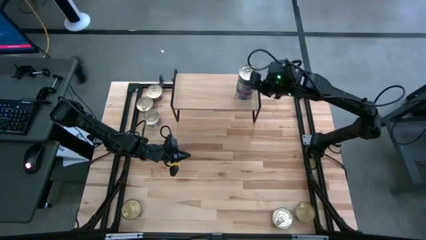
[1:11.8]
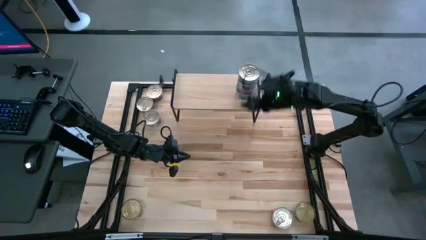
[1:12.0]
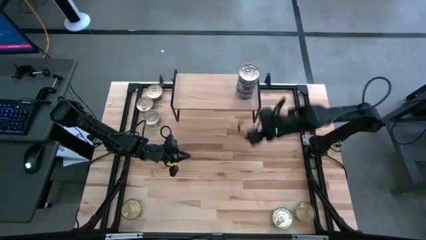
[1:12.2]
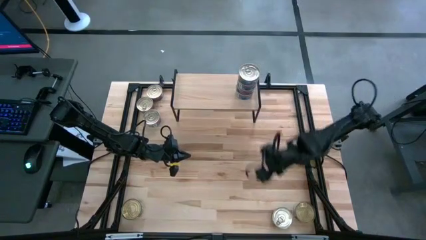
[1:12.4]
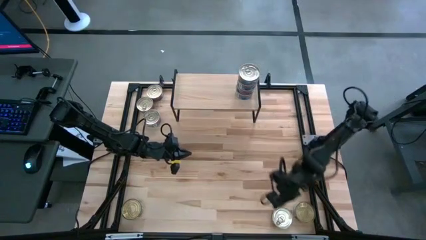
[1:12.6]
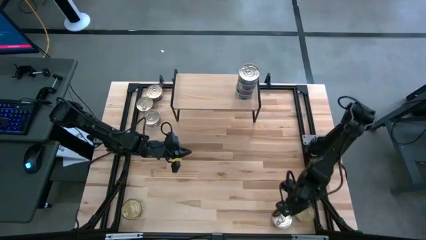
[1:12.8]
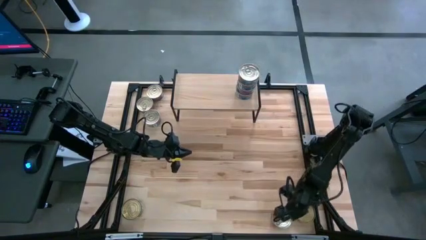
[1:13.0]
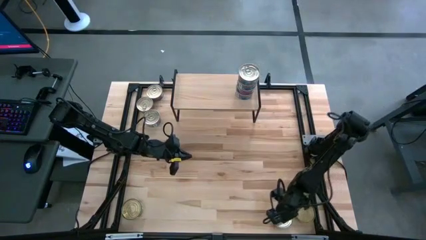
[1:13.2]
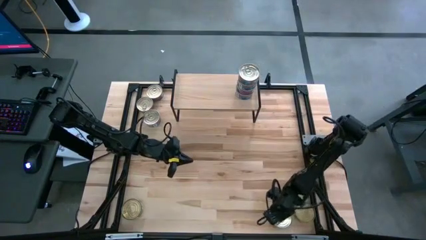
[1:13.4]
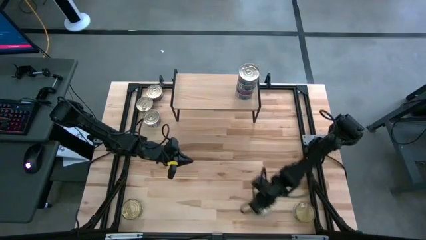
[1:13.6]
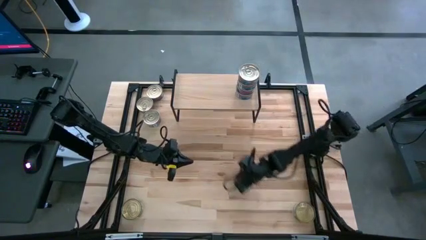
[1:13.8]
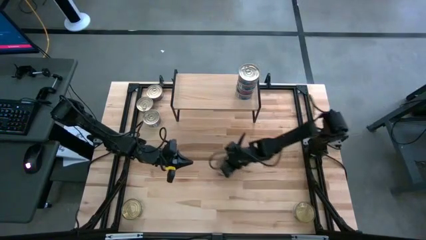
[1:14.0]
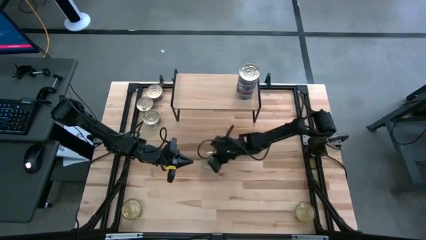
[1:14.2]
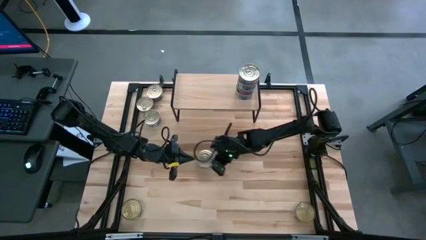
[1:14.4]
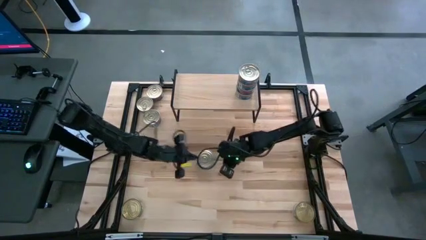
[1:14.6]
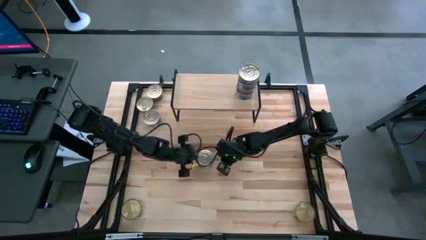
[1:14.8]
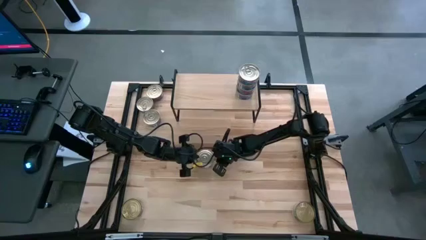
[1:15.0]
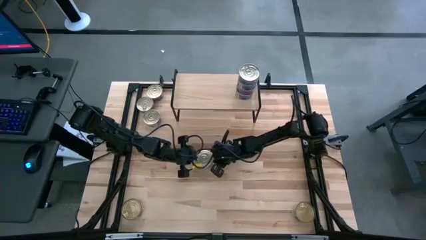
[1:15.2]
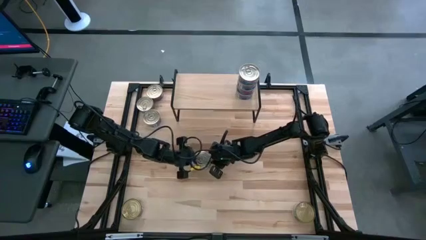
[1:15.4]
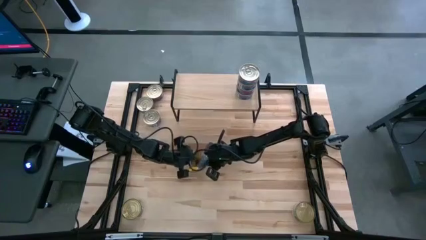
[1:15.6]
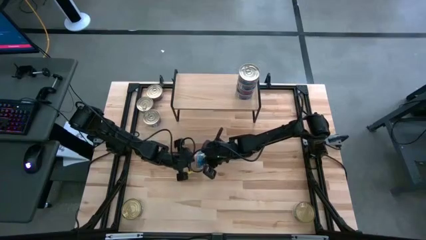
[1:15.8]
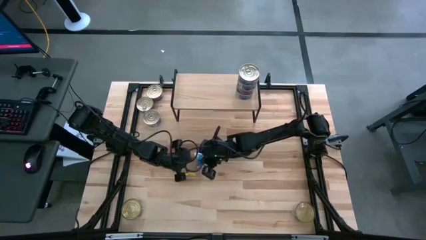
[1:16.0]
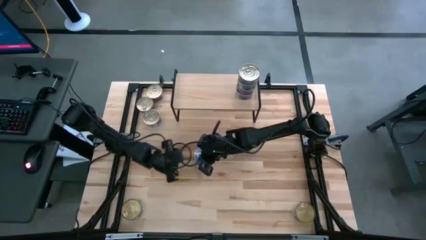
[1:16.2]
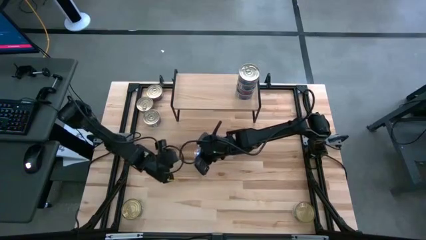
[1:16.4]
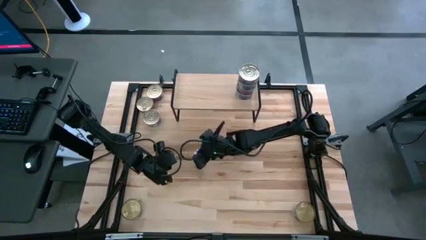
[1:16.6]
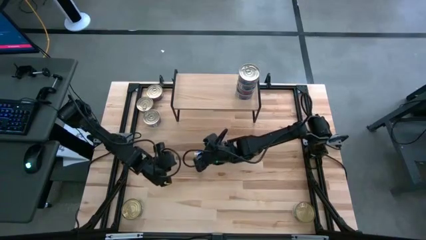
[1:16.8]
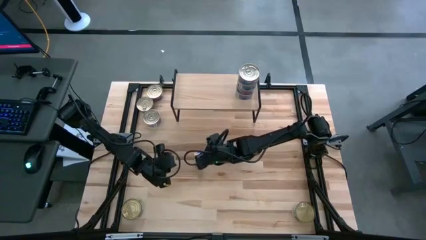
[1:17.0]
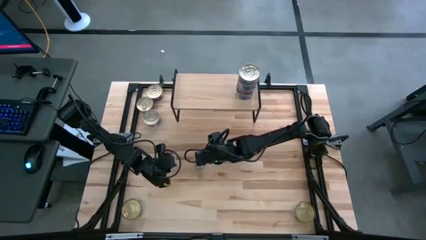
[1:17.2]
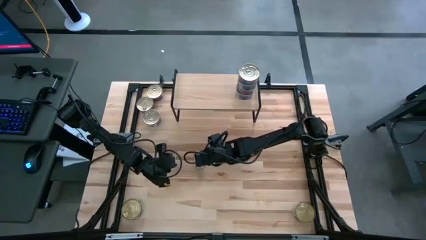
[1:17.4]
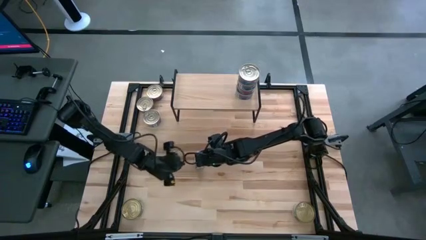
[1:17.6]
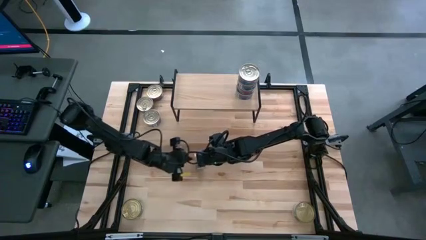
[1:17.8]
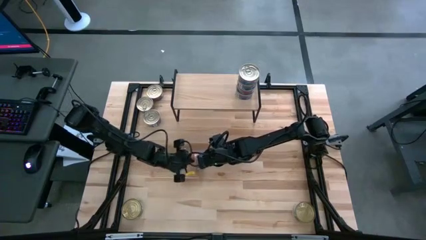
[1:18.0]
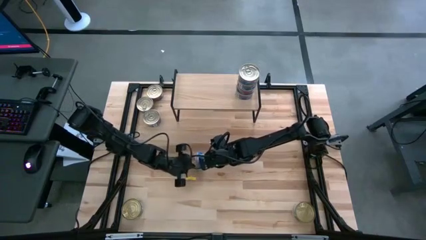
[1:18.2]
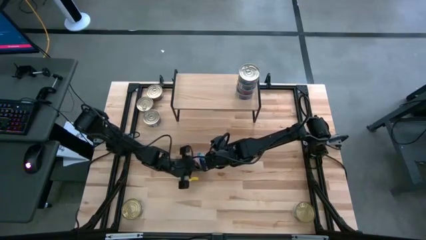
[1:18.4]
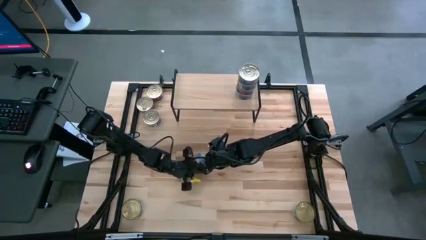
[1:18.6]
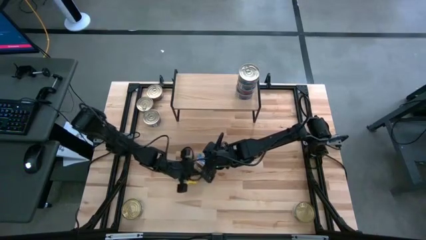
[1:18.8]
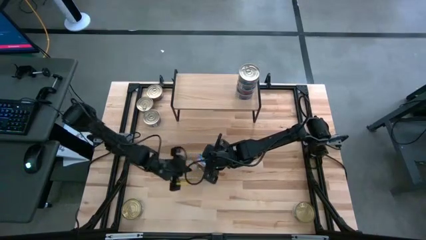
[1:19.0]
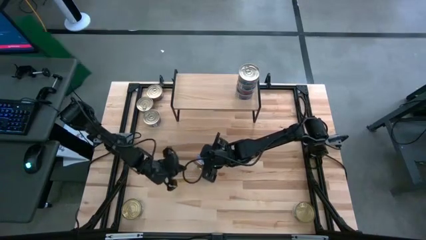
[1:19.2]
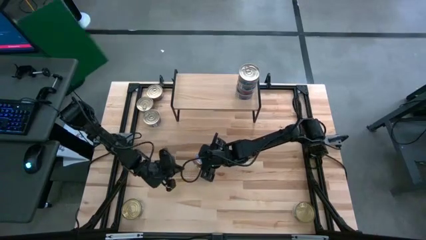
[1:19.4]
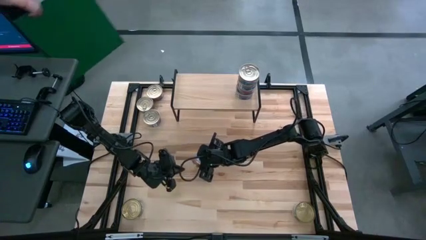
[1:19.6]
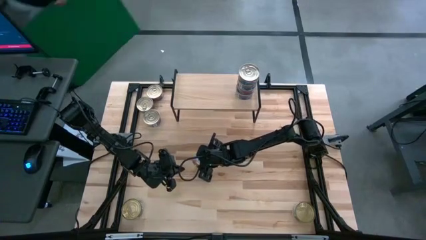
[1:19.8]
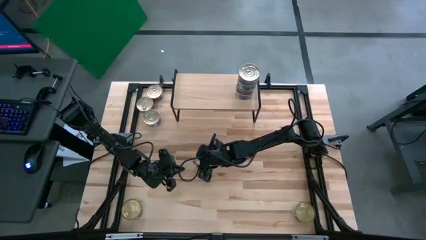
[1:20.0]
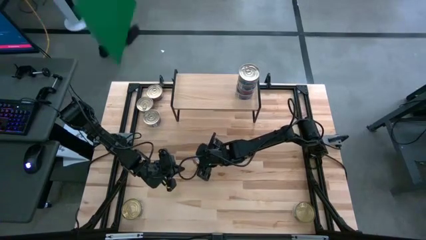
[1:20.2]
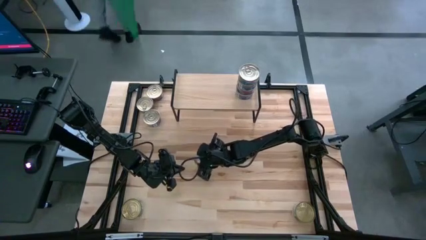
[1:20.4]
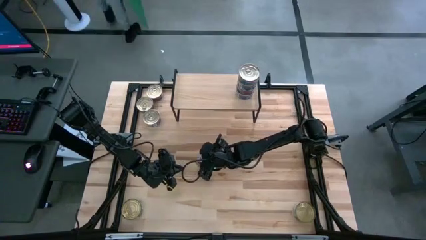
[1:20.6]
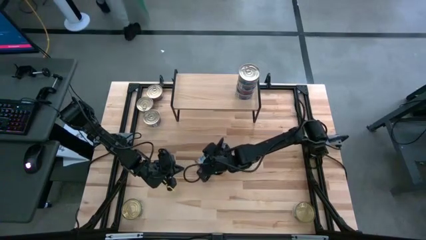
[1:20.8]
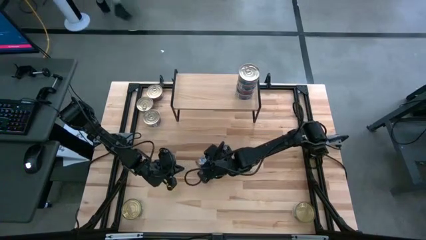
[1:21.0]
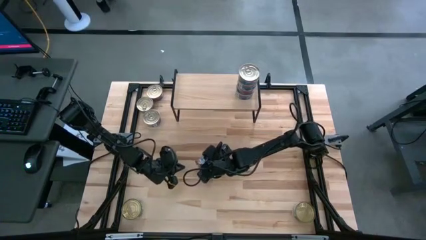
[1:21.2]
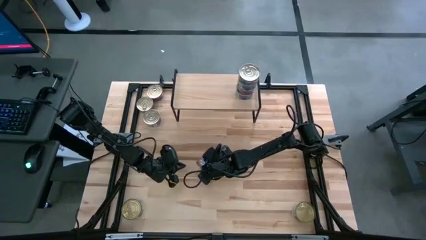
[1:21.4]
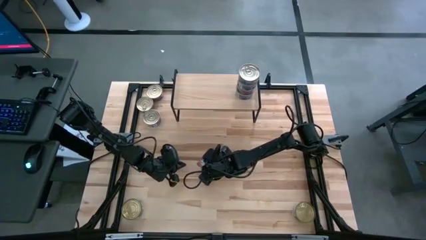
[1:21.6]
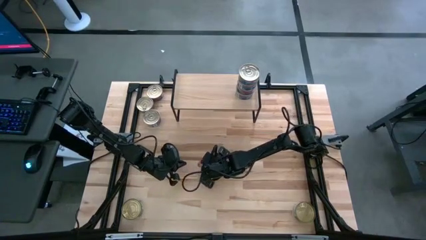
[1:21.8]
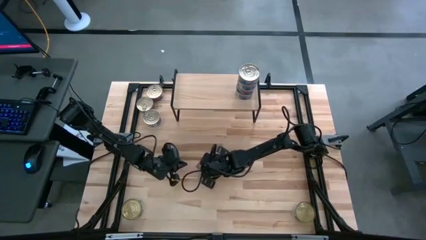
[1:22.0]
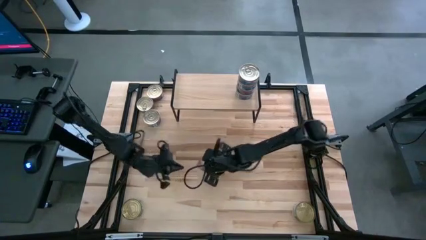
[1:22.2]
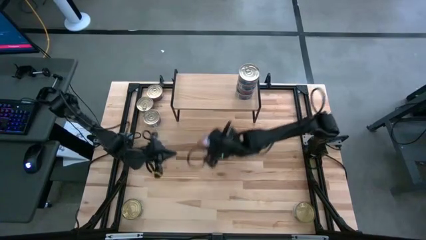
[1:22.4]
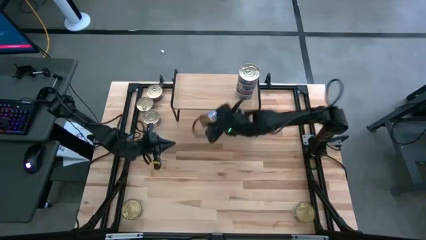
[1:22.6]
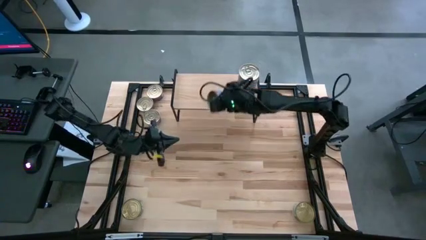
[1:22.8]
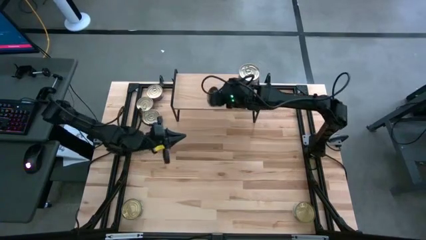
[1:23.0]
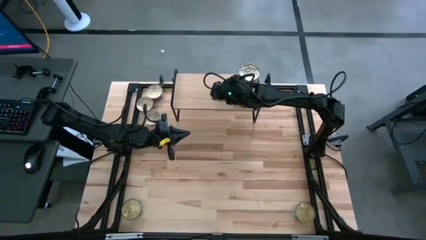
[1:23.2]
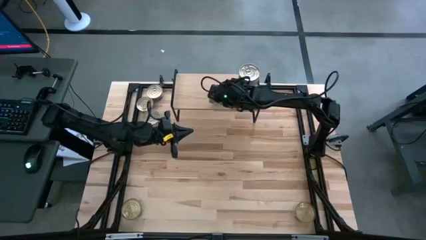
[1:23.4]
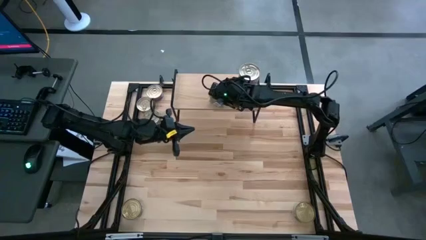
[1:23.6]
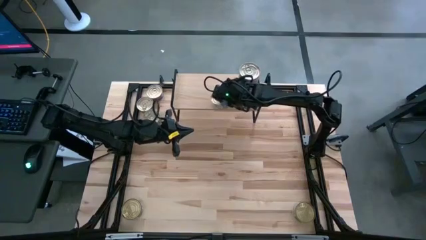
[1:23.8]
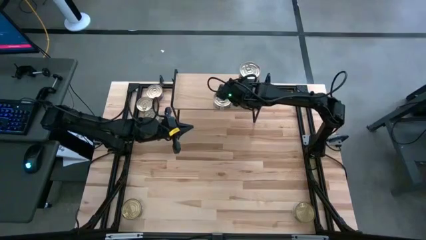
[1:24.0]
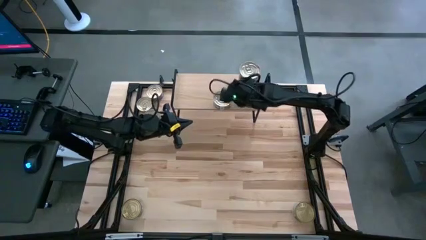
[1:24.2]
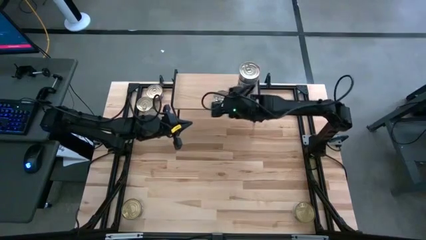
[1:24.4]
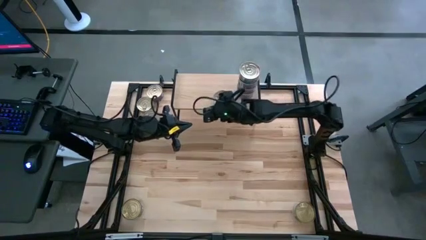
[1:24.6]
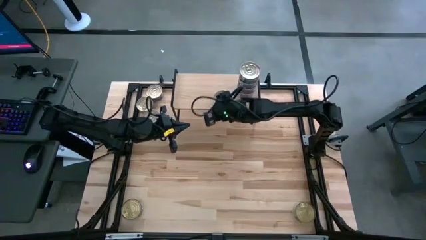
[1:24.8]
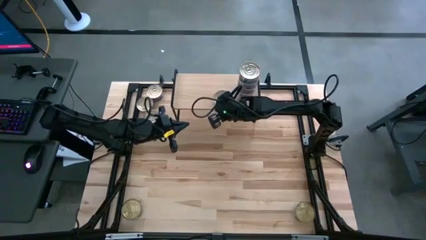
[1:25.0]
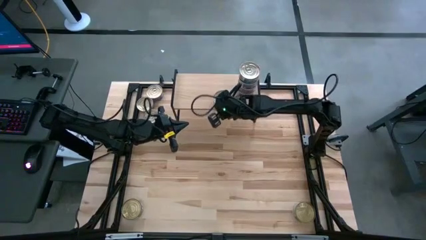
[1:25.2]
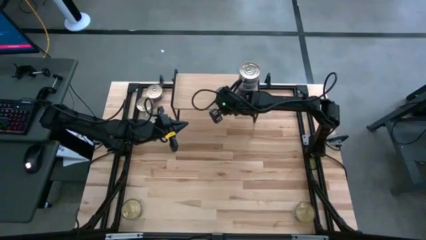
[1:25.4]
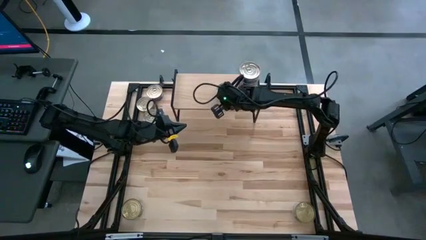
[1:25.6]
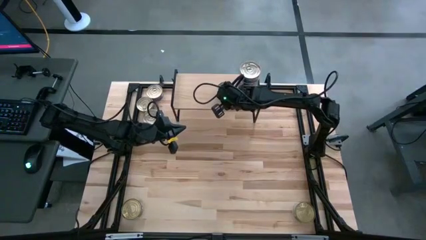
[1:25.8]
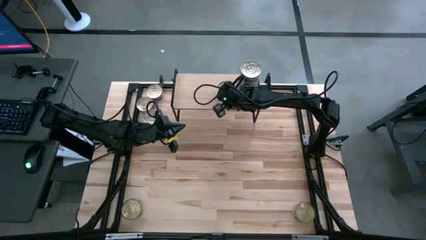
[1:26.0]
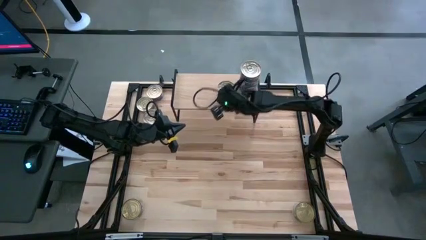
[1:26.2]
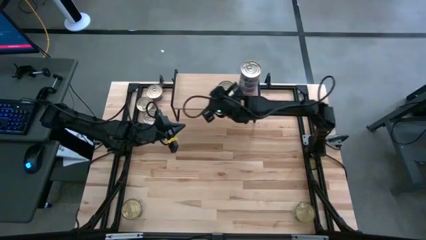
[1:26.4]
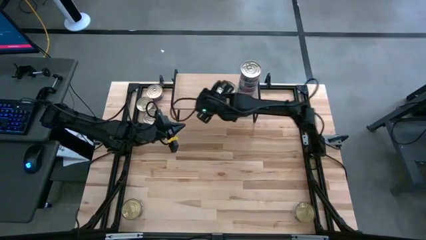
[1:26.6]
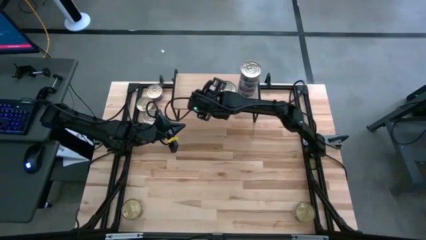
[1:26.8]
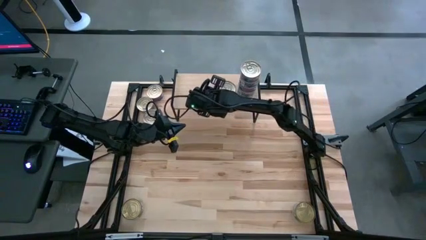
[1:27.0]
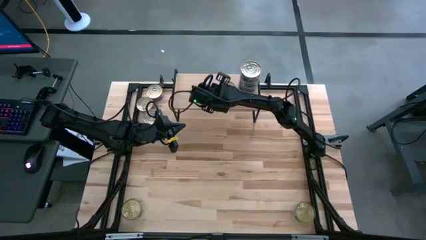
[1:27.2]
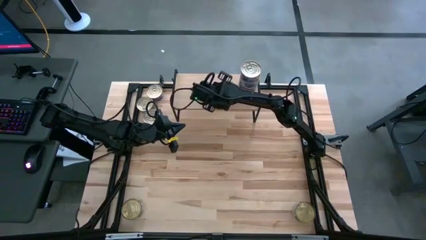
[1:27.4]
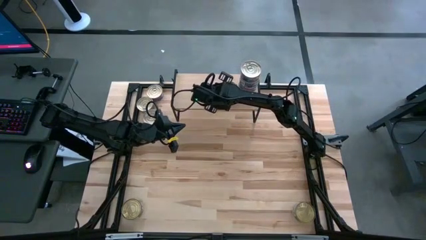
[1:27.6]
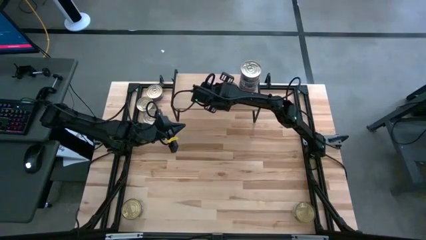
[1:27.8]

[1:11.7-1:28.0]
Task: Stack canned seafood by type on shelf
Put the blue tuna can on the shelf
